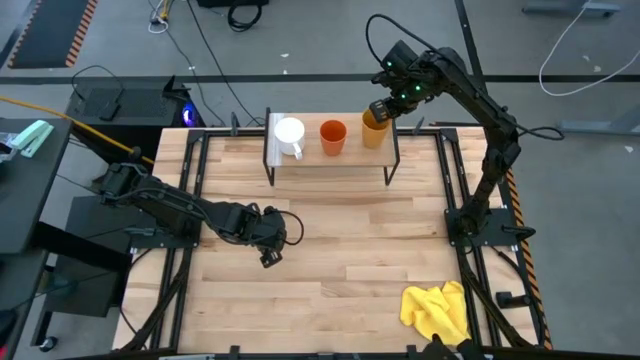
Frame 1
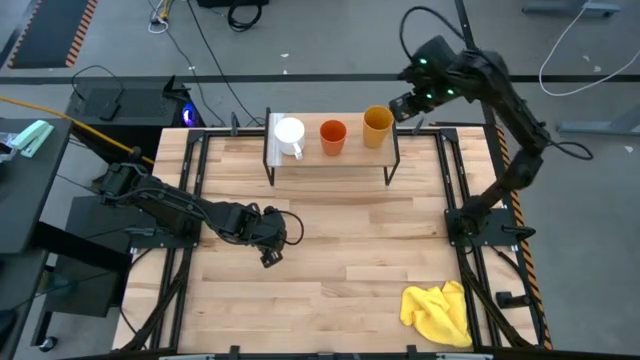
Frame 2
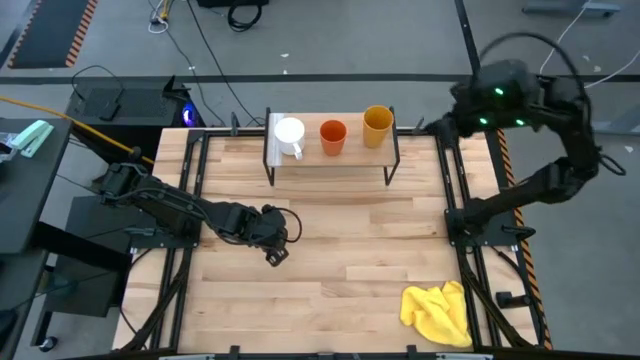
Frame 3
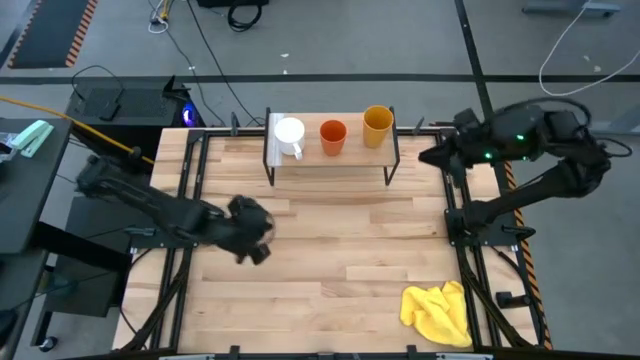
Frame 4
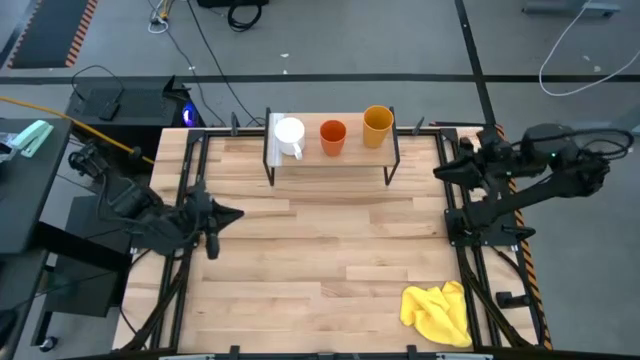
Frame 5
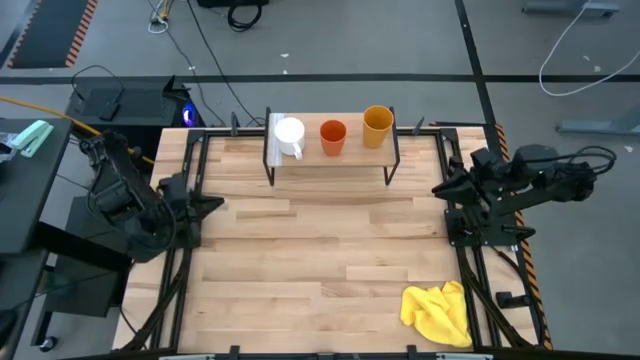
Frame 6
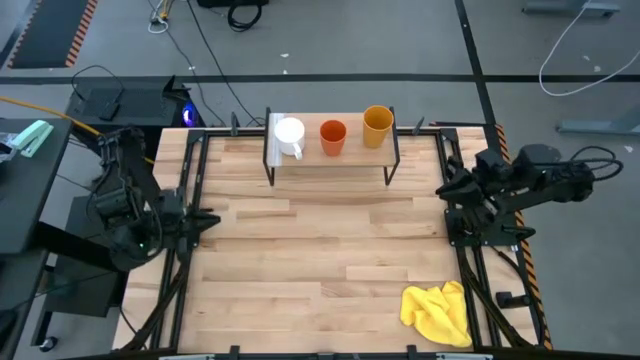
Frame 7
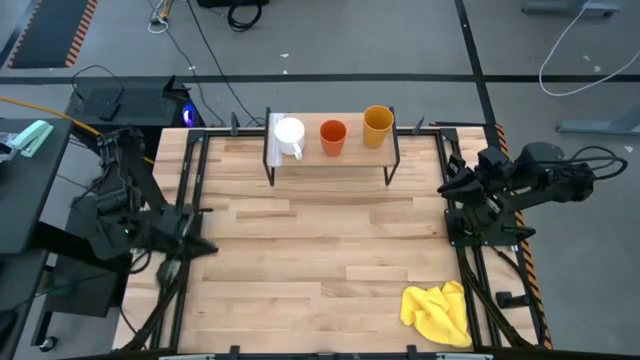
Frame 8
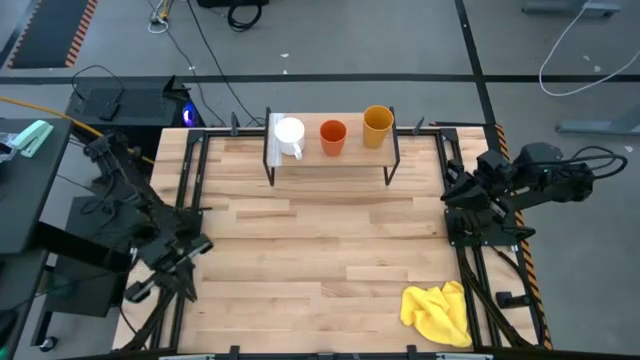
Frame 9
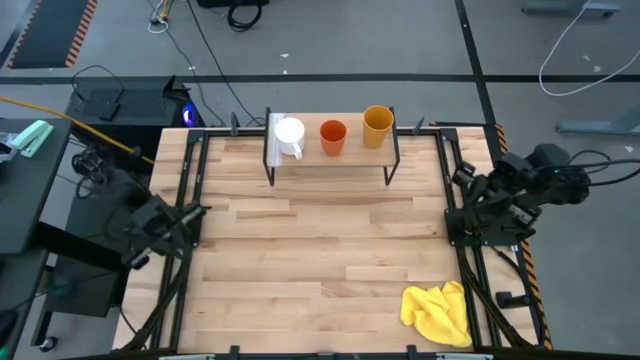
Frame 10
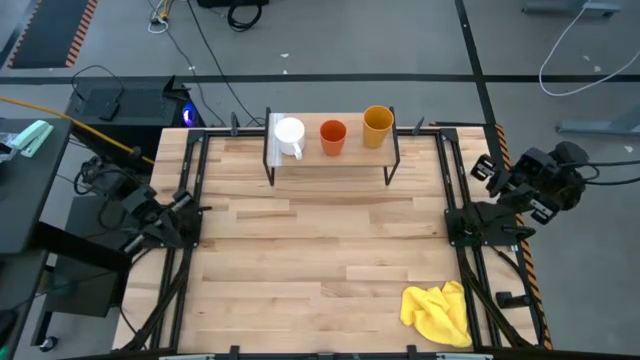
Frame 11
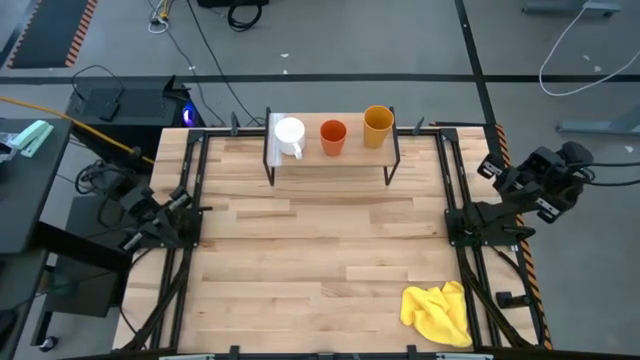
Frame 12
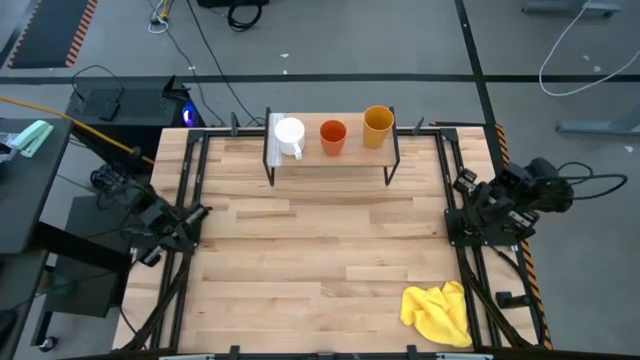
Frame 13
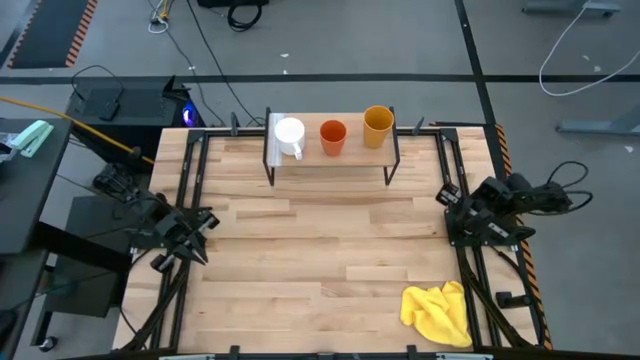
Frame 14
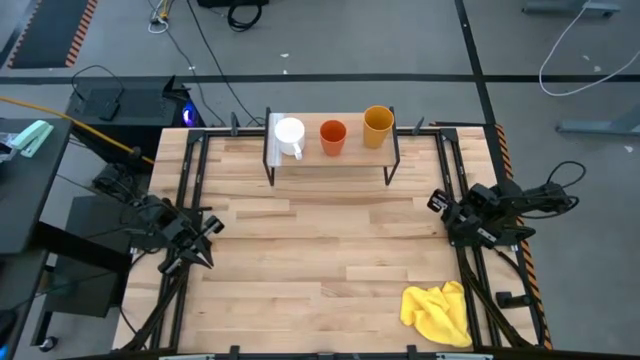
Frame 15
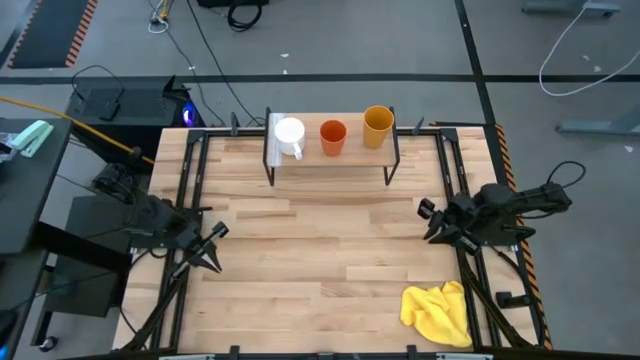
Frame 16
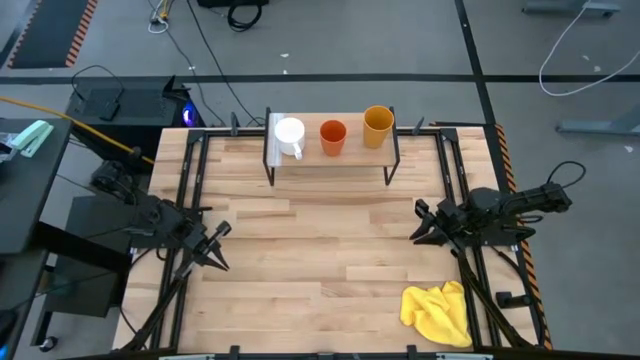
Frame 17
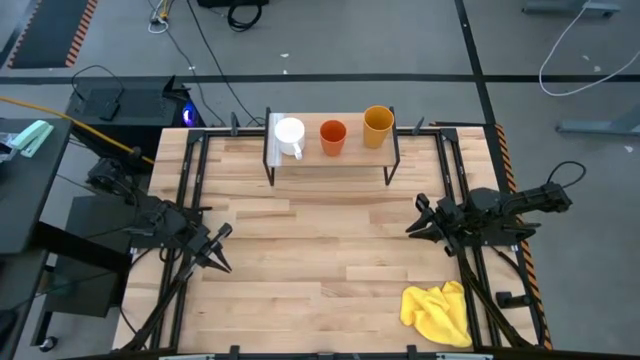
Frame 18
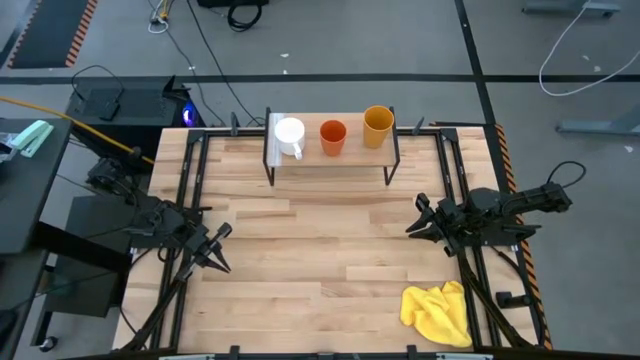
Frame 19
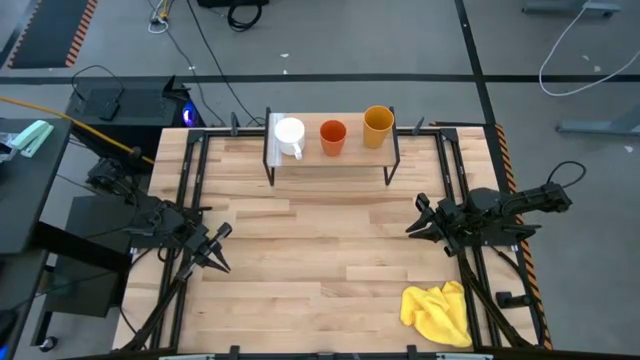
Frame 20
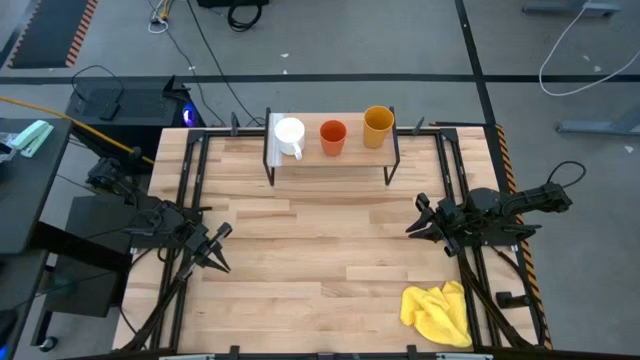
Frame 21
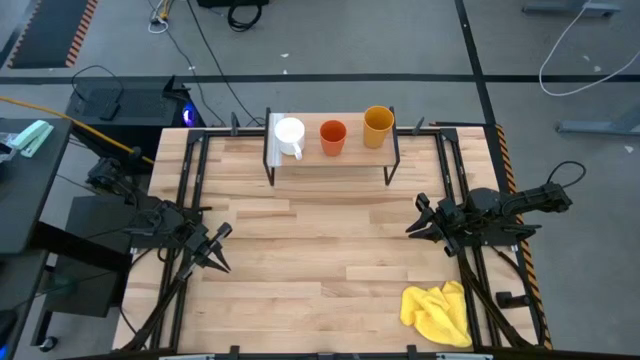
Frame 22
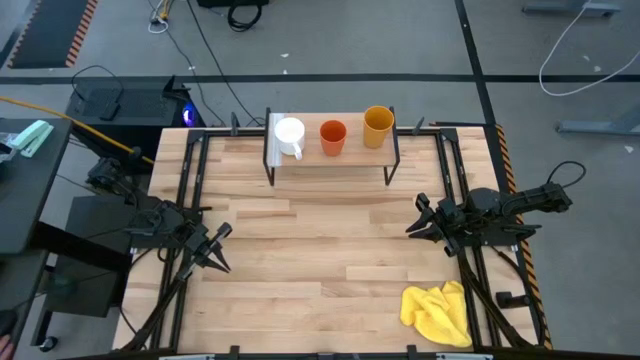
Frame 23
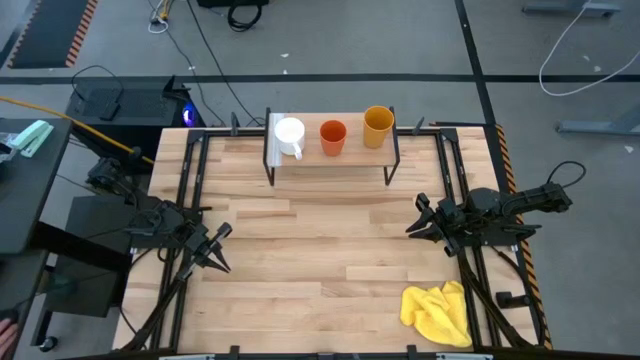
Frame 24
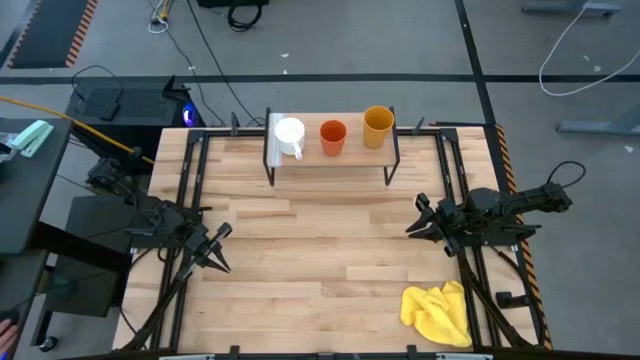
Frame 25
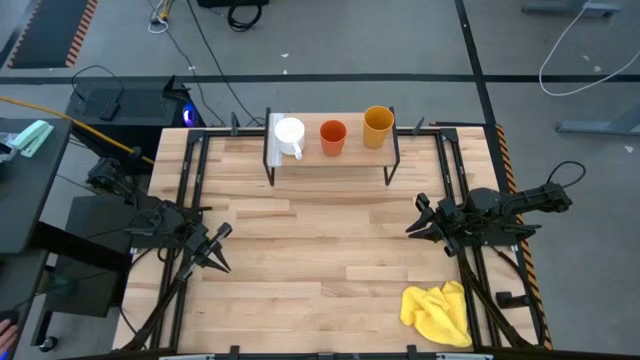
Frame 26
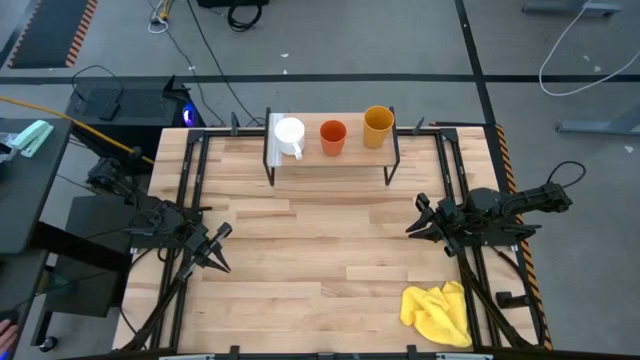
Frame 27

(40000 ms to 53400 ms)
Task: Stack small to large cups/mugs on shelf
Return to Home Position

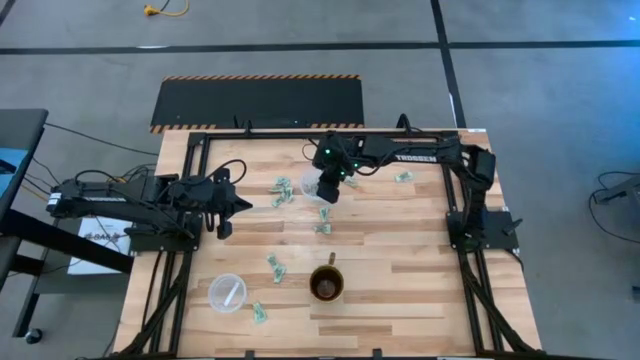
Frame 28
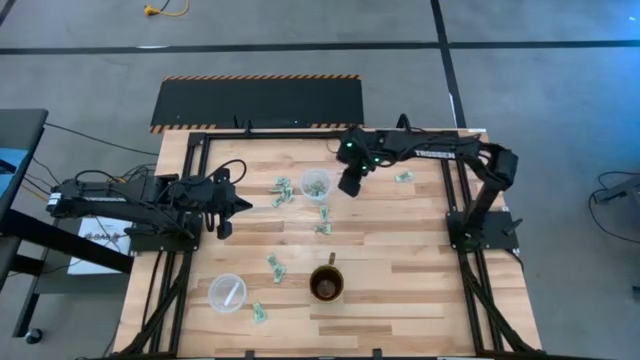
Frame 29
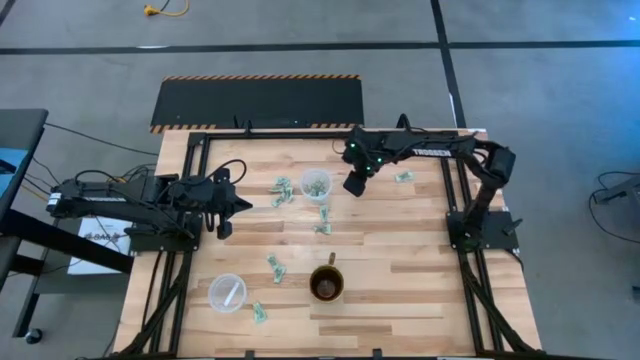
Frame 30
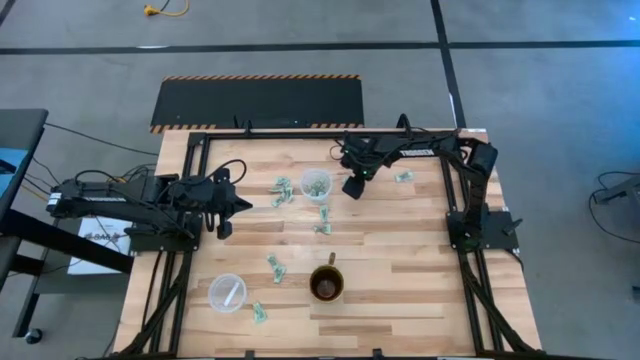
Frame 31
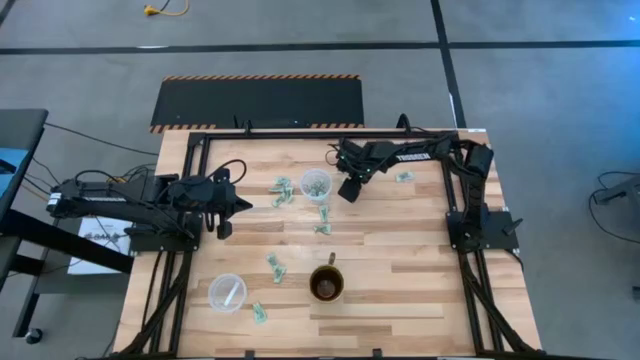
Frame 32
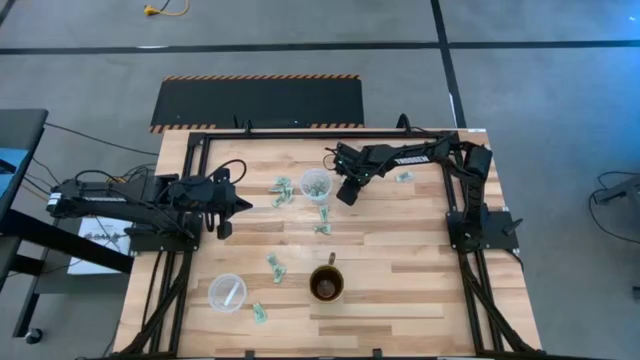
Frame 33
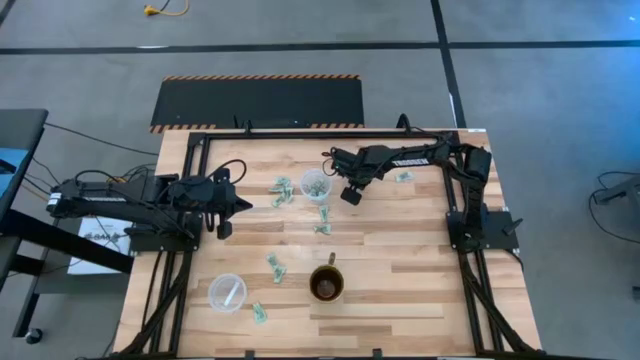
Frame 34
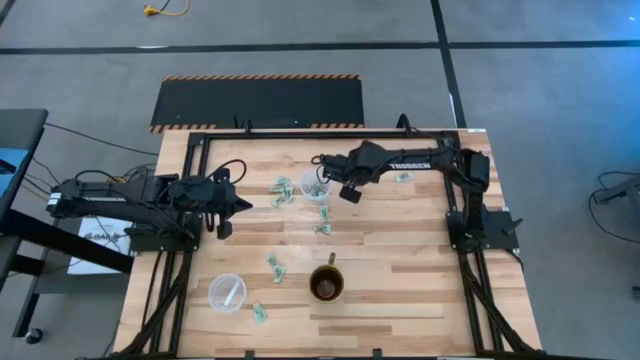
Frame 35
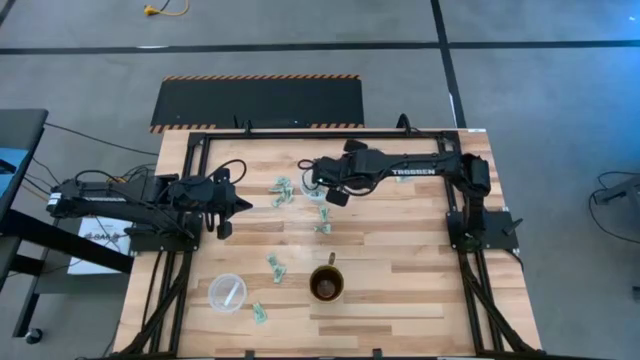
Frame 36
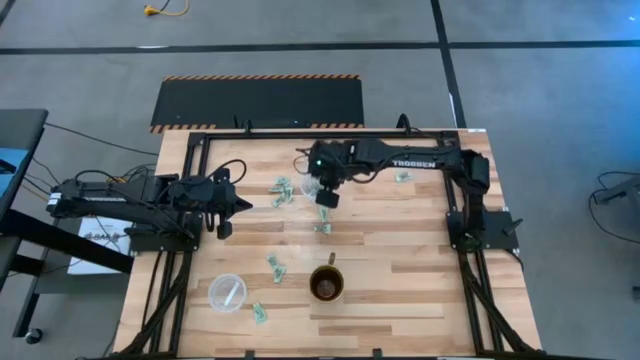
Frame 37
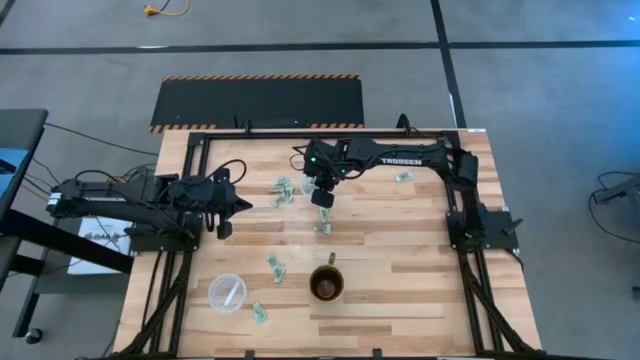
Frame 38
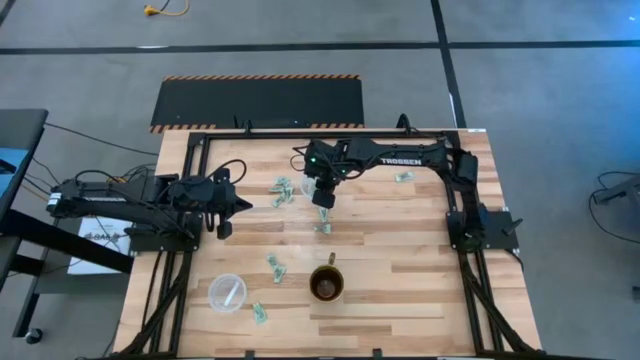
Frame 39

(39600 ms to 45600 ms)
Task: Pick and place items into bin
Put the stevia packet into the top transparent bin

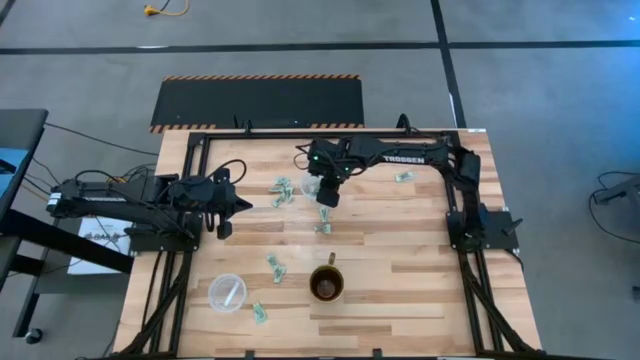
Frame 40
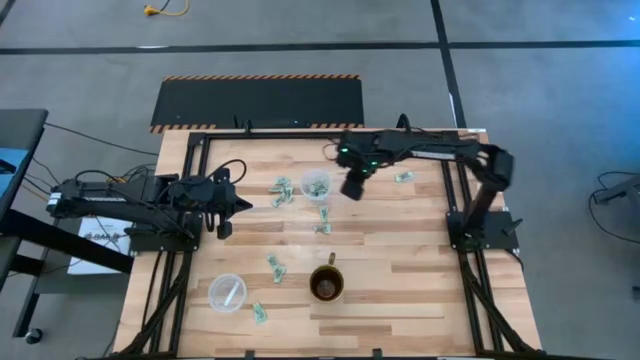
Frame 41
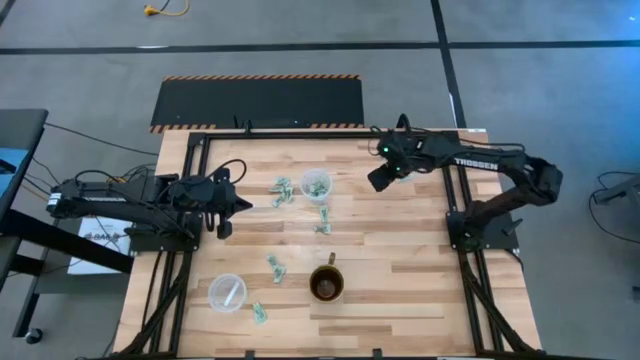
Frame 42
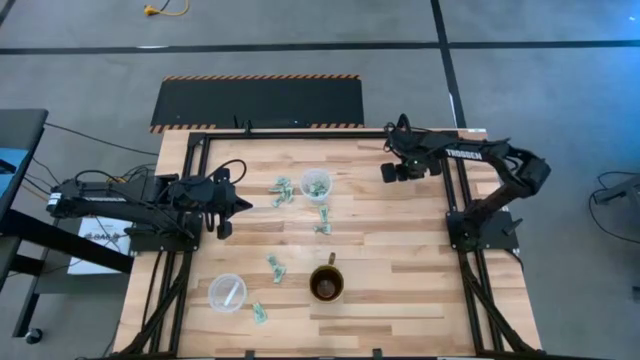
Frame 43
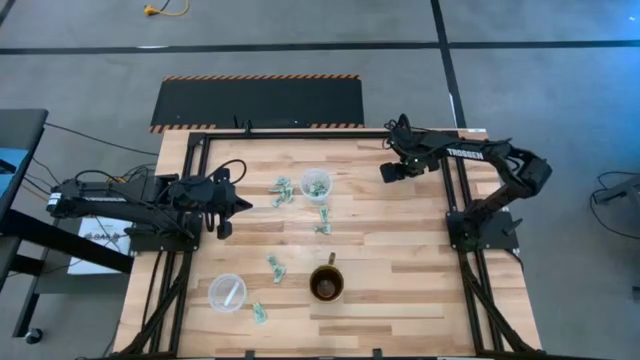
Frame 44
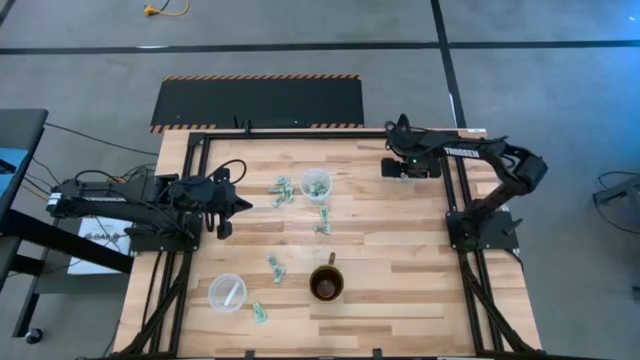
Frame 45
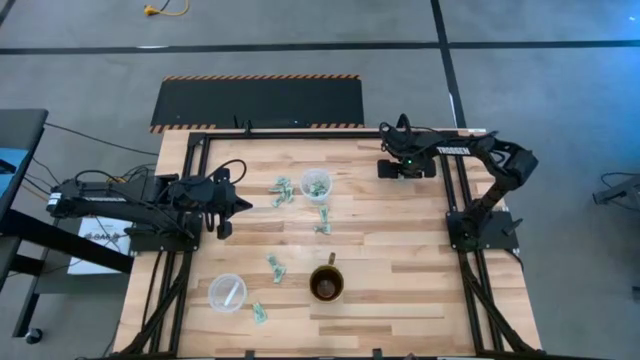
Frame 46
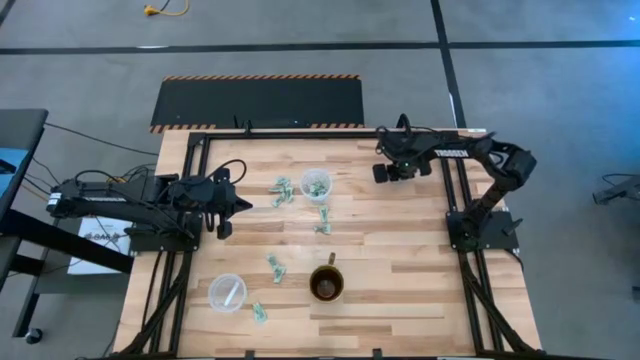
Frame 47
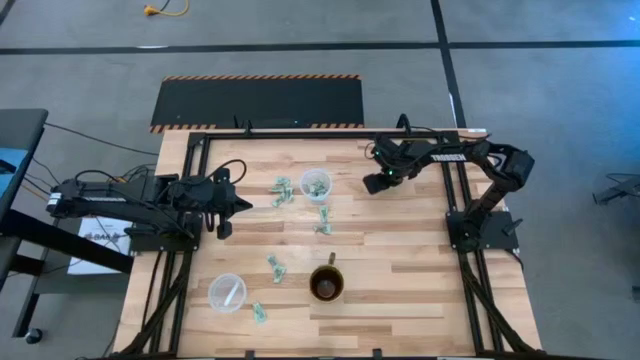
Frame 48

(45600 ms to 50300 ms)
Put the stevia packet into the top transparent bin
